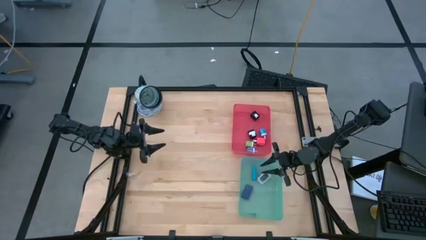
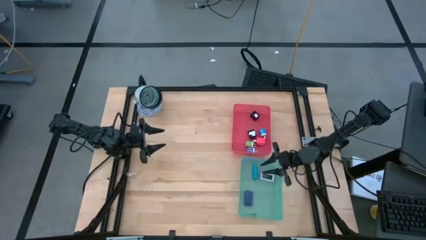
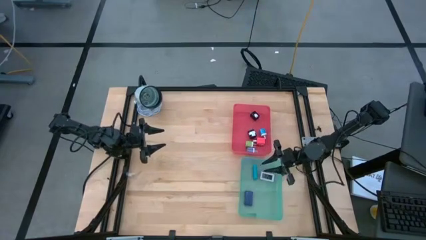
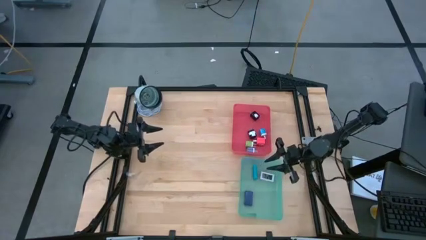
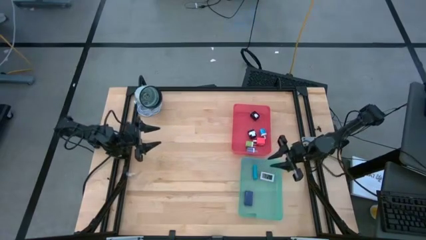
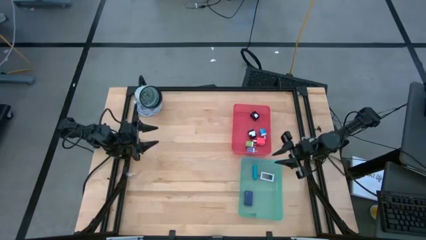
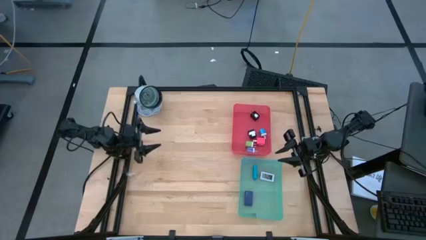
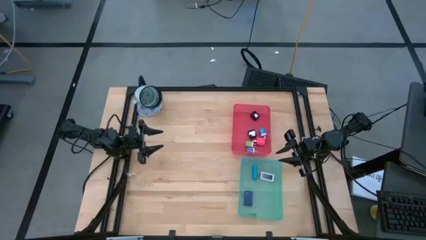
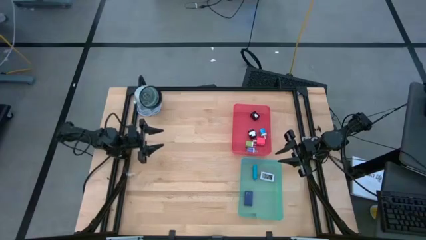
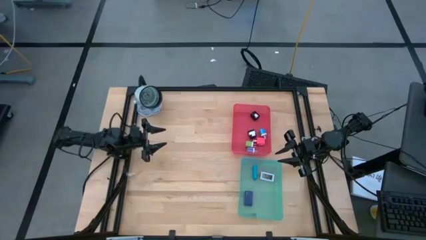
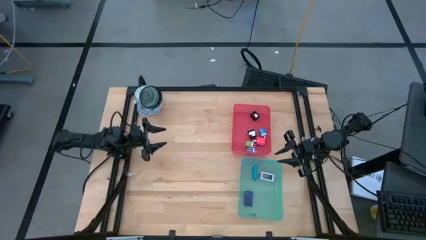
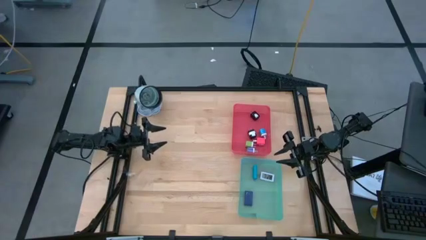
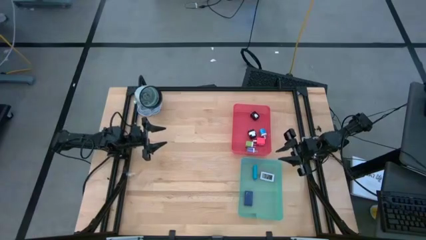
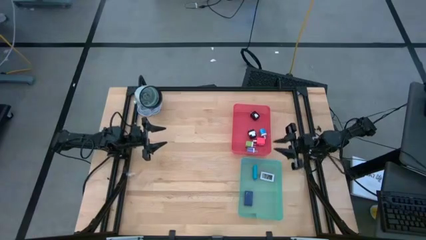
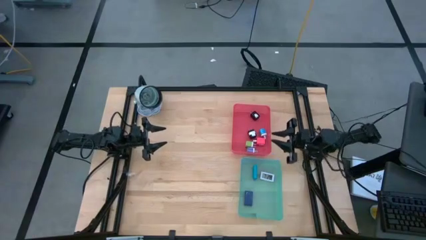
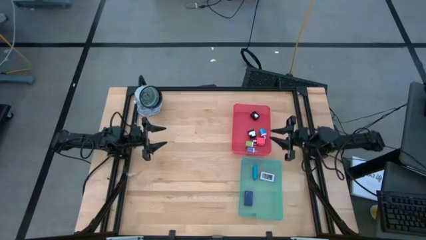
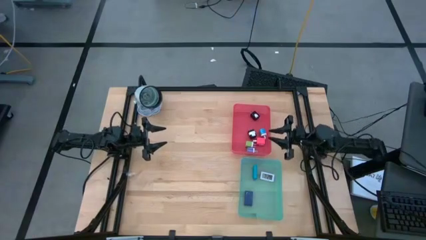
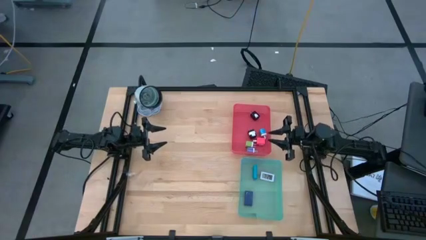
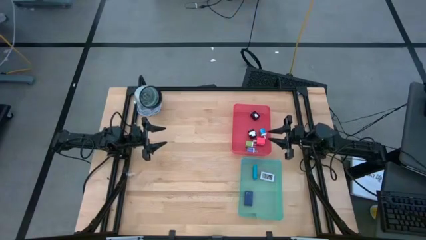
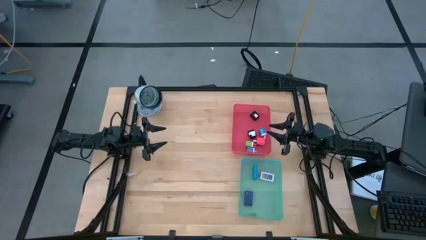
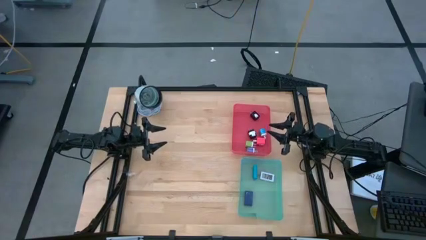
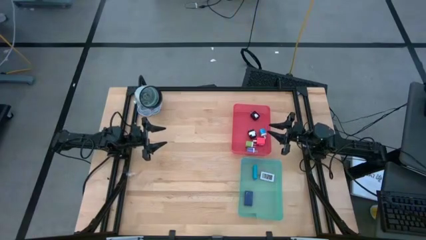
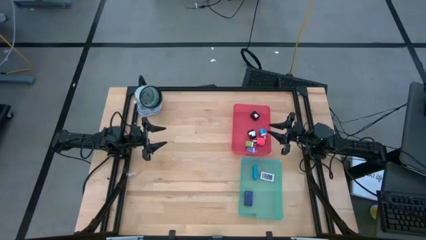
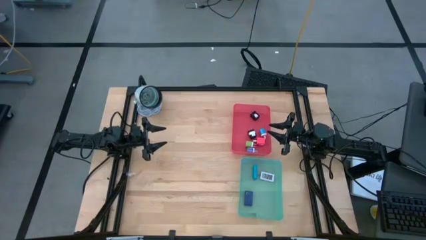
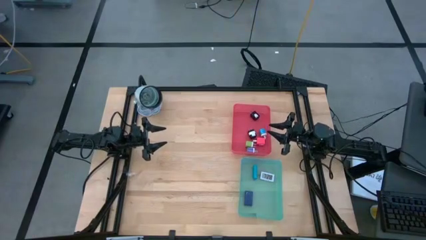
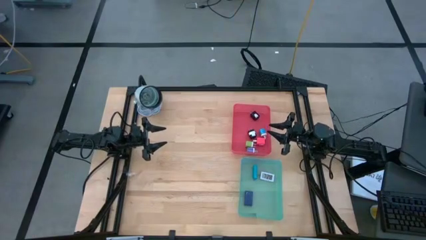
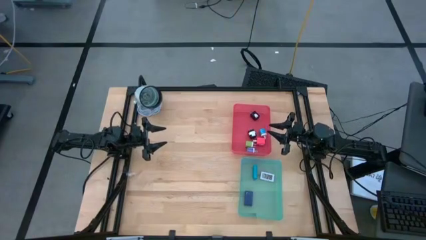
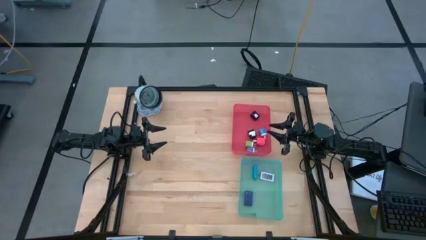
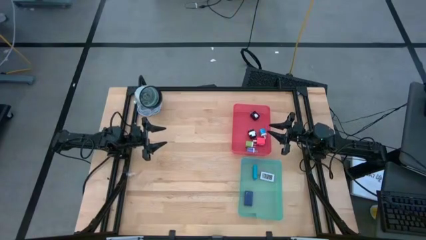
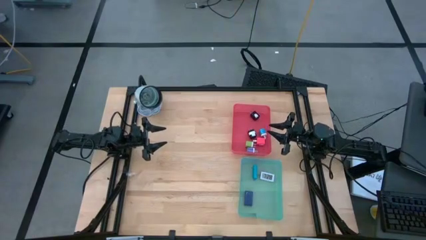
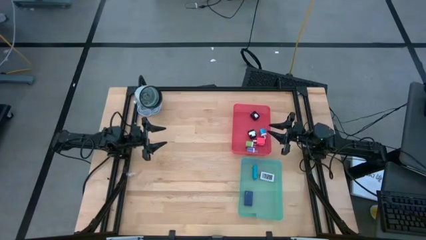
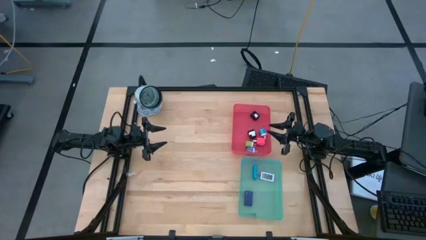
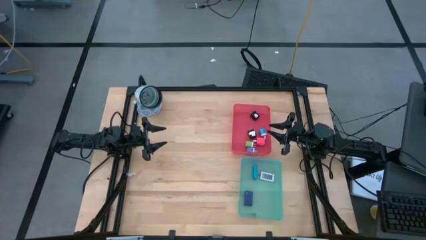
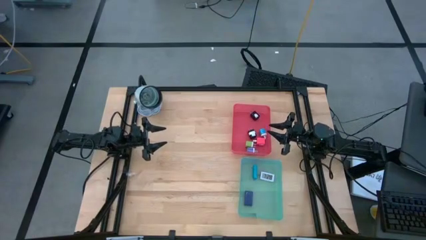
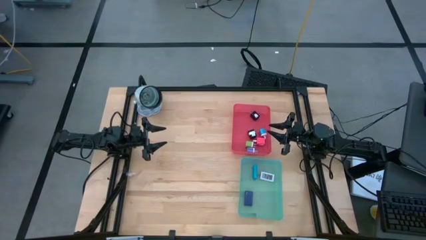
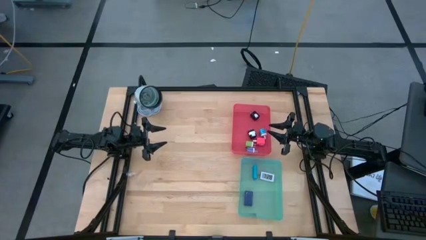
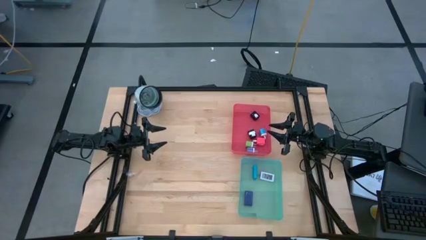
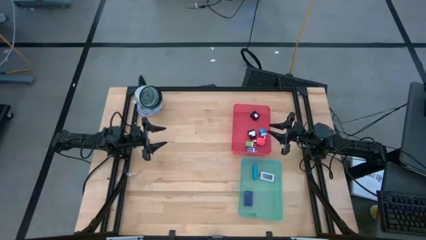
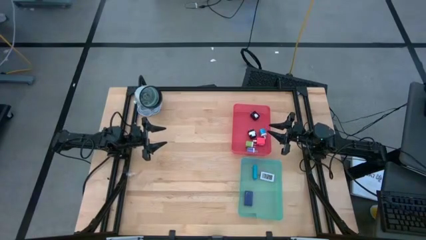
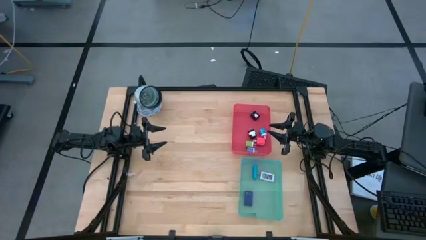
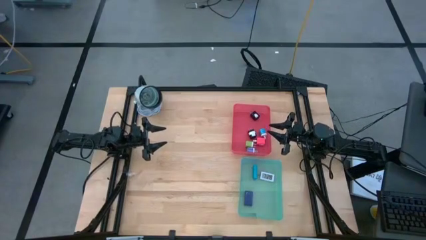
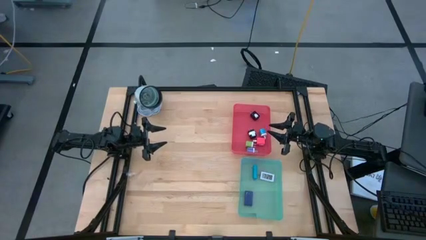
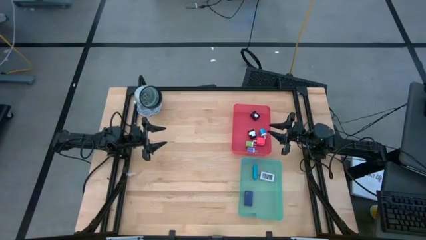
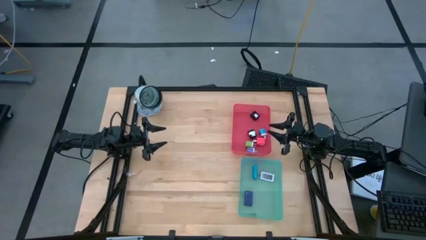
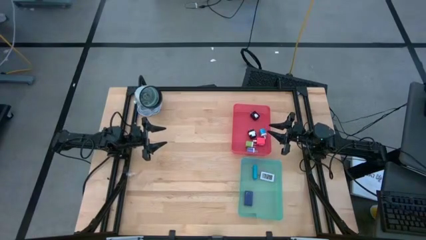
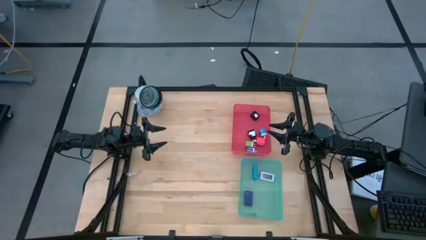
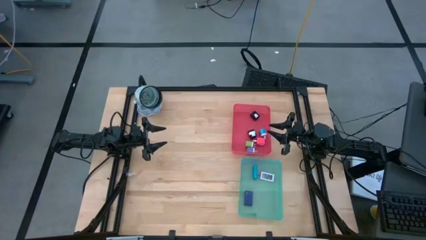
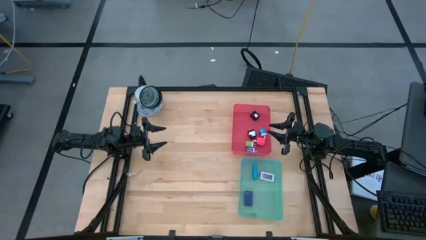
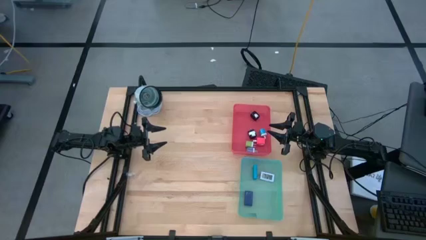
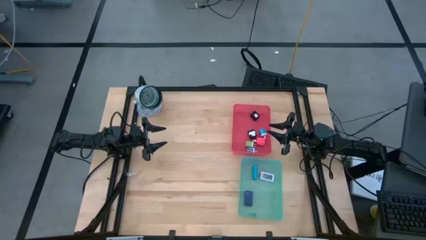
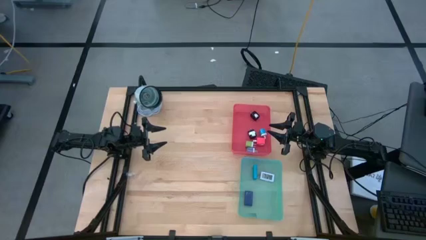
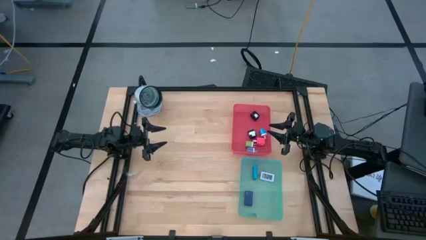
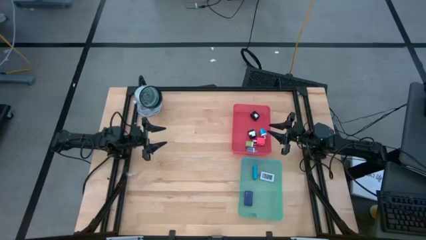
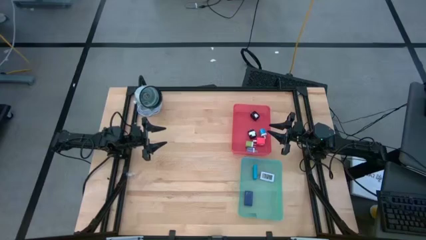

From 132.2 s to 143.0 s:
Task: Pick & Place Office items
Return to Home Position
